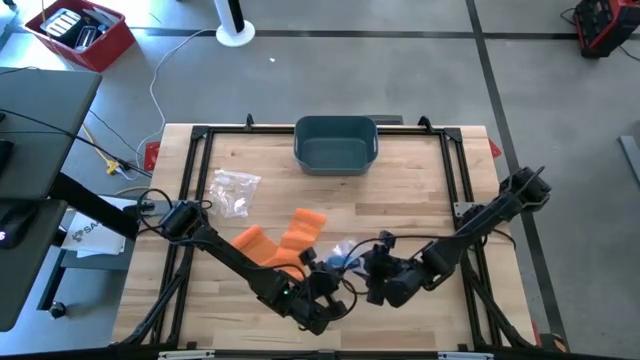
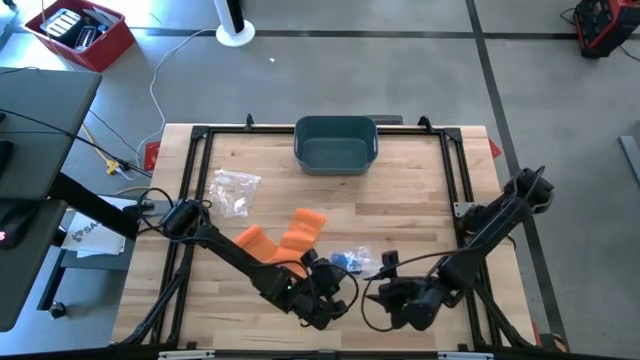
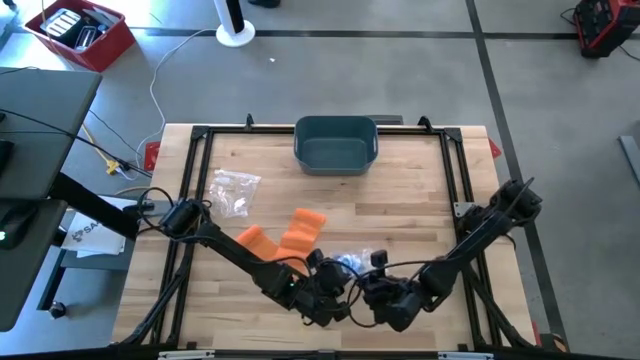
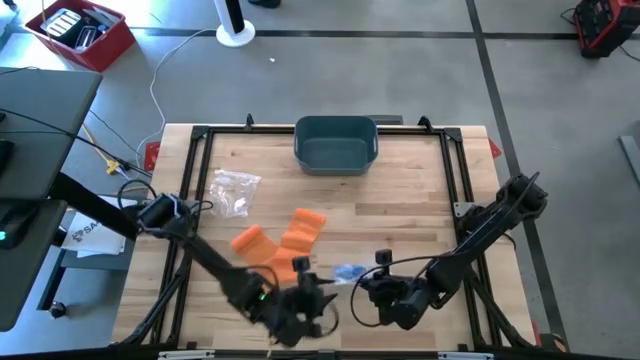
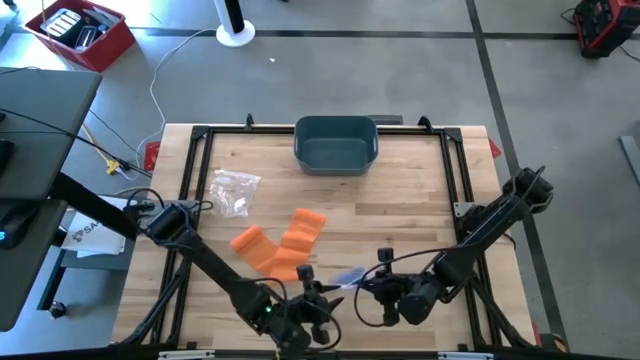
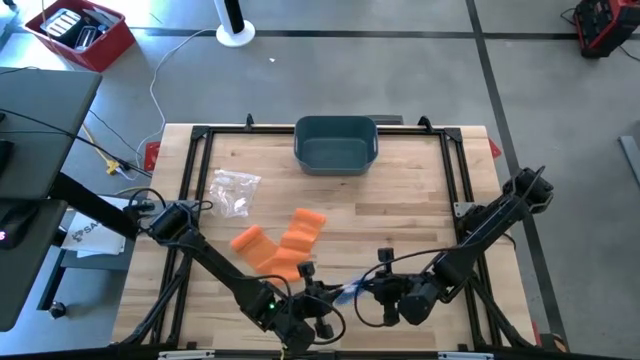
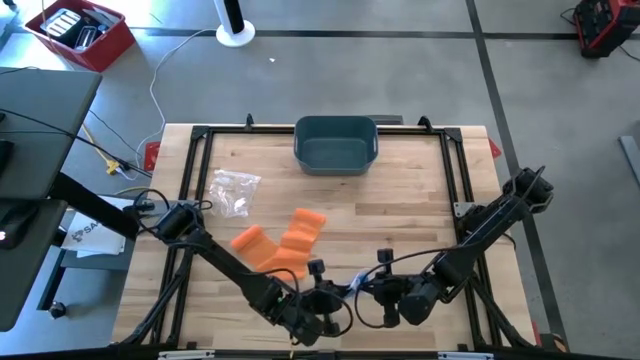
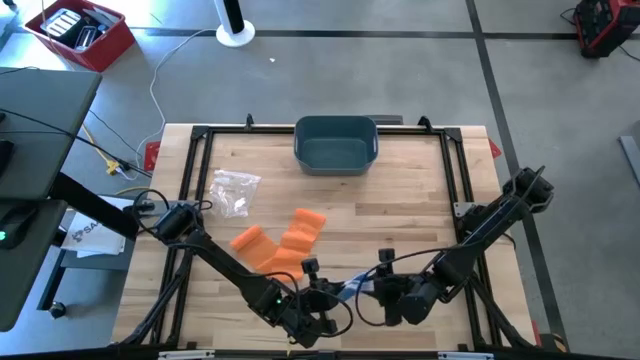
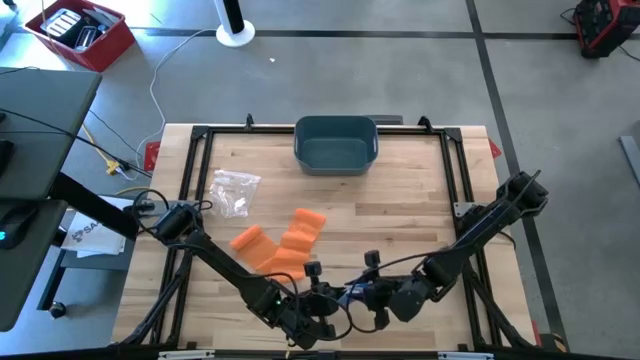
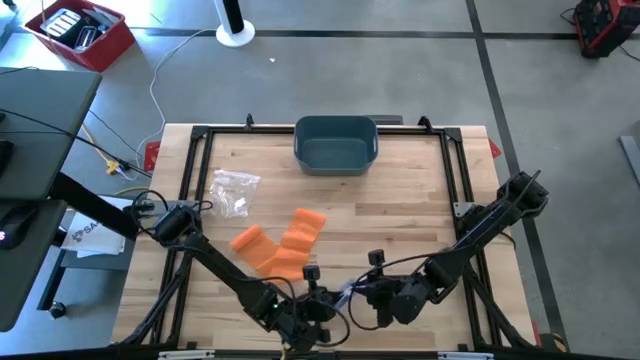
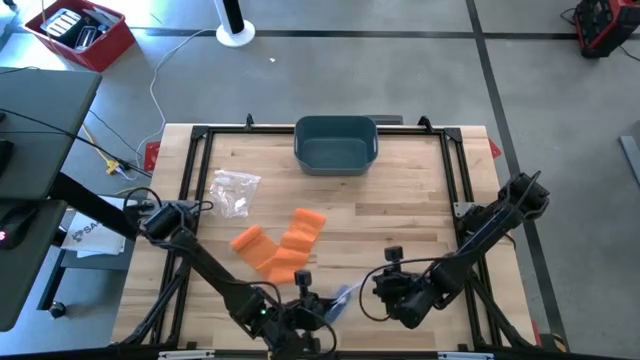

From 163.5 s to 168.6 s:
Task: Roll bandage
Close the transparent zip bag

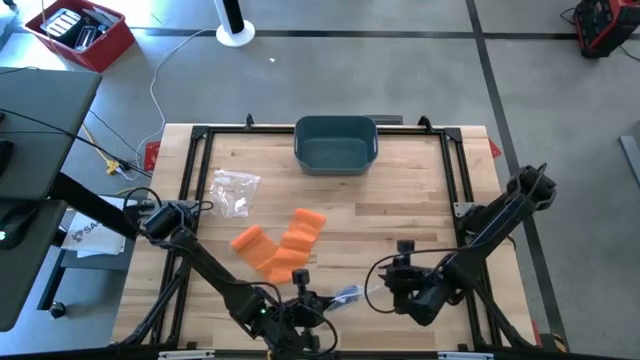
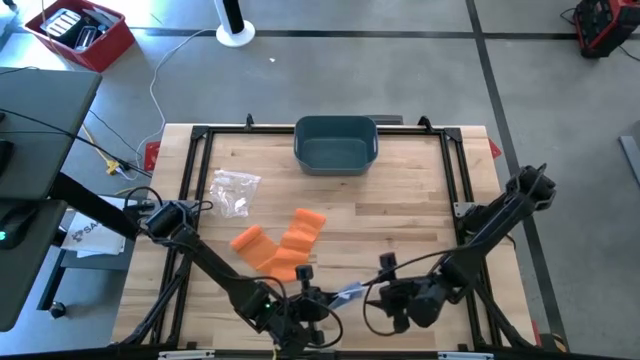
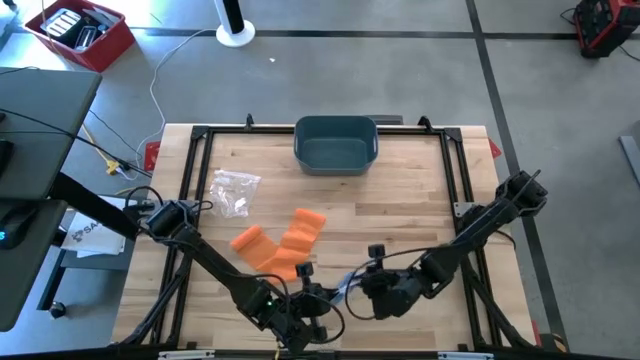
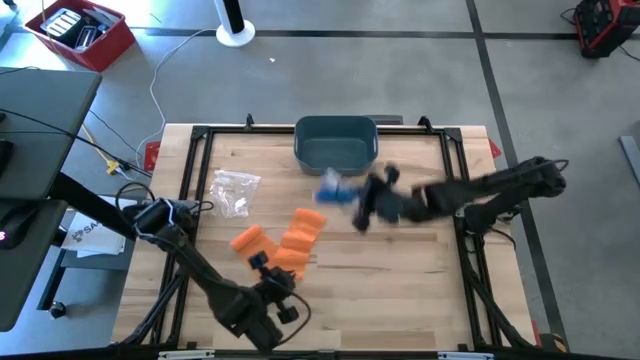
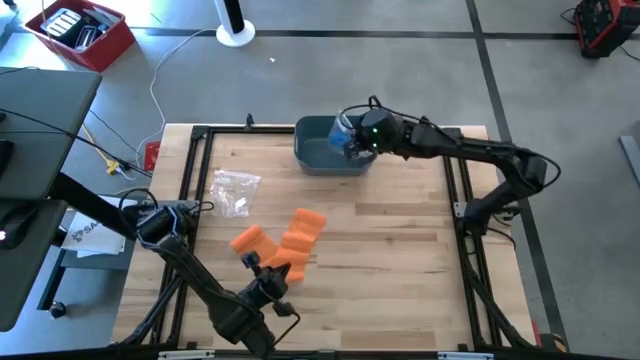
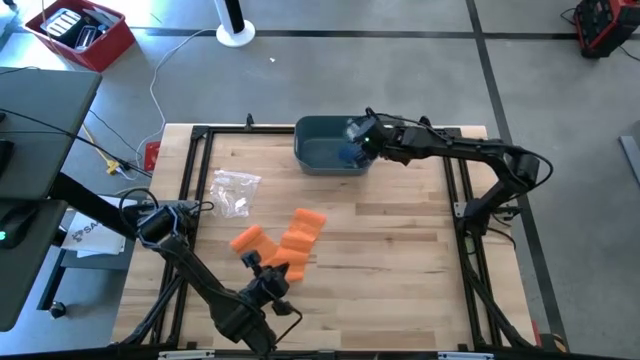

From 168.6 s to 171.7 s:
Put the transparent zip bag with the blue bandage into the blue bin
